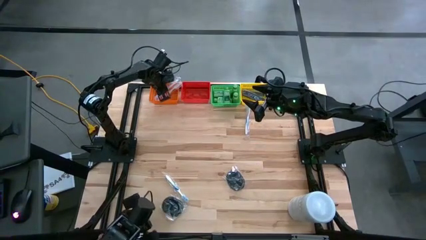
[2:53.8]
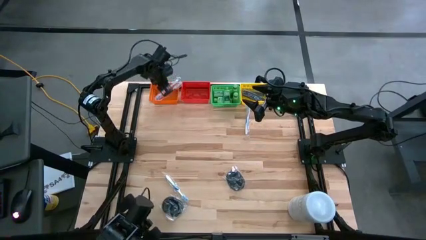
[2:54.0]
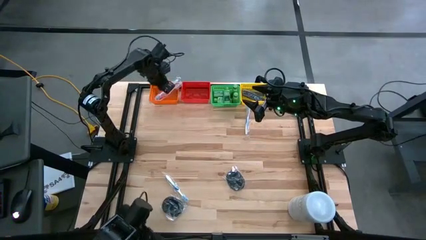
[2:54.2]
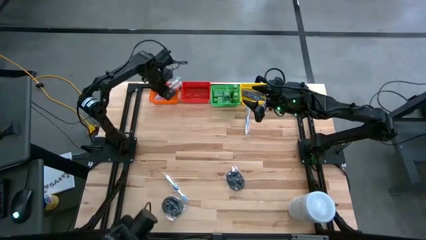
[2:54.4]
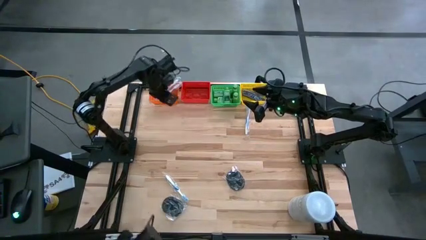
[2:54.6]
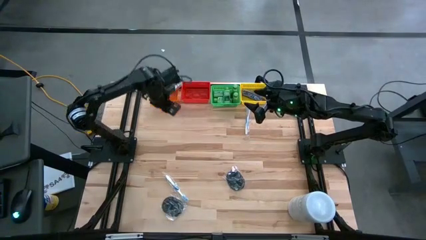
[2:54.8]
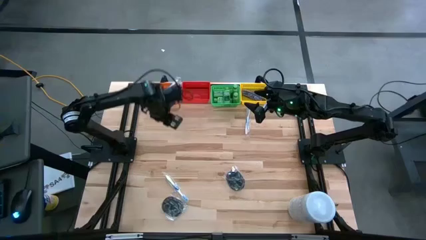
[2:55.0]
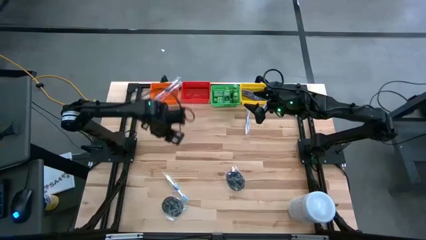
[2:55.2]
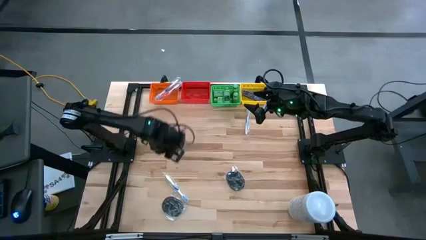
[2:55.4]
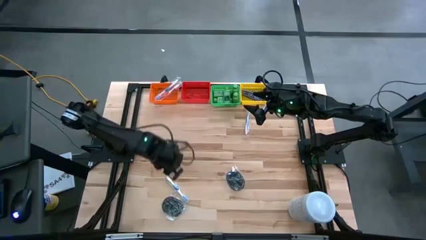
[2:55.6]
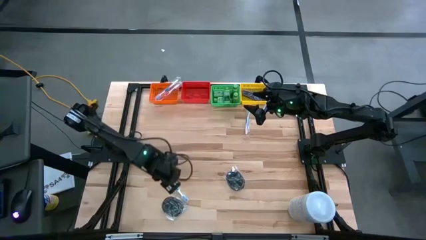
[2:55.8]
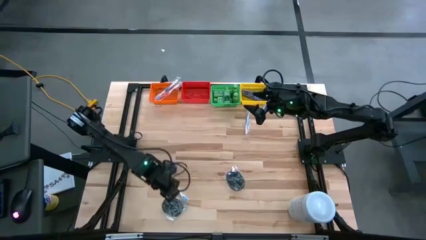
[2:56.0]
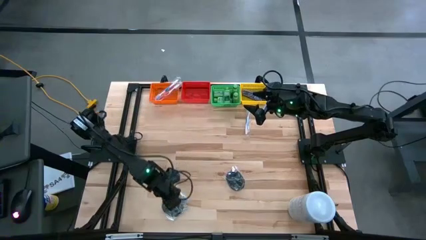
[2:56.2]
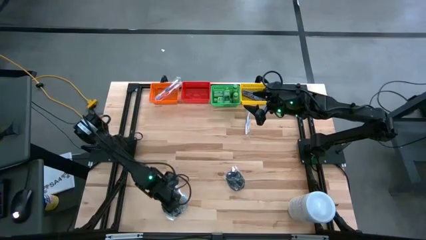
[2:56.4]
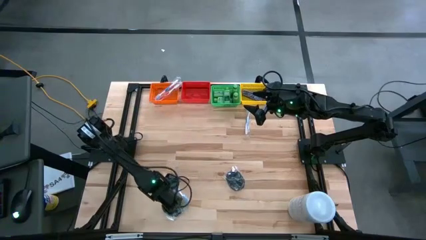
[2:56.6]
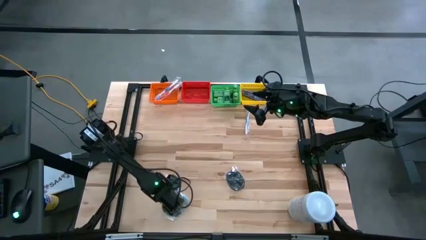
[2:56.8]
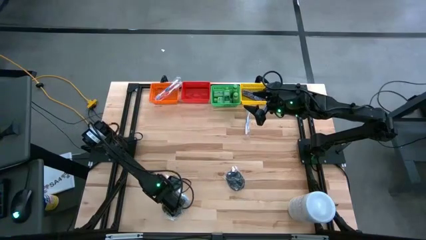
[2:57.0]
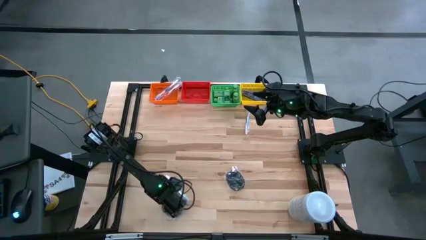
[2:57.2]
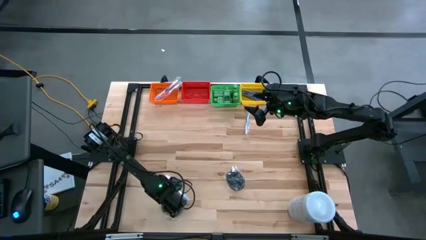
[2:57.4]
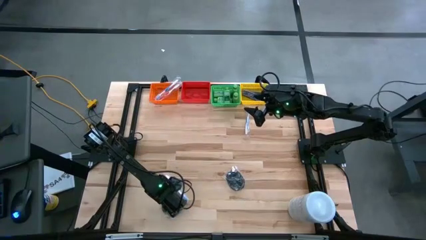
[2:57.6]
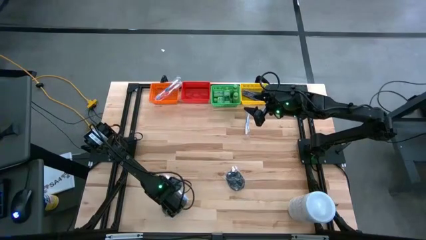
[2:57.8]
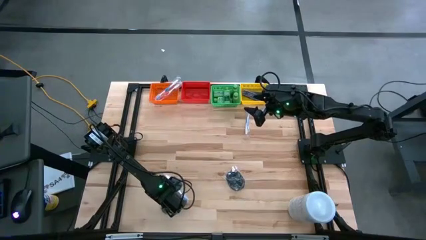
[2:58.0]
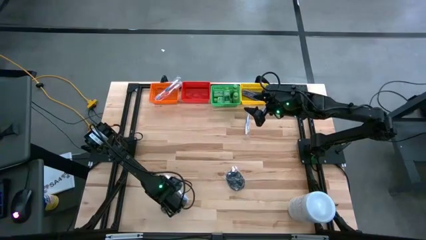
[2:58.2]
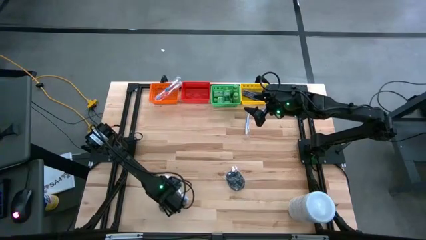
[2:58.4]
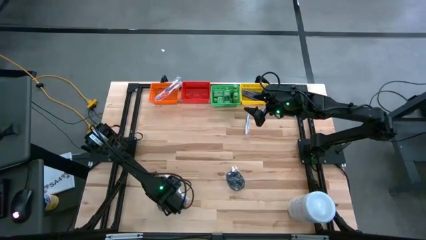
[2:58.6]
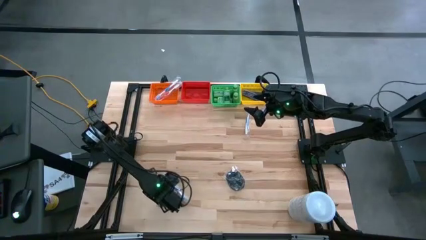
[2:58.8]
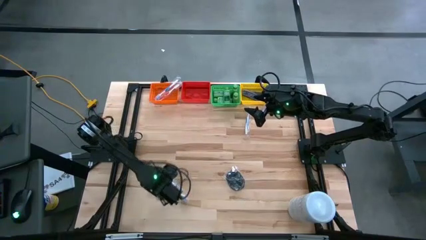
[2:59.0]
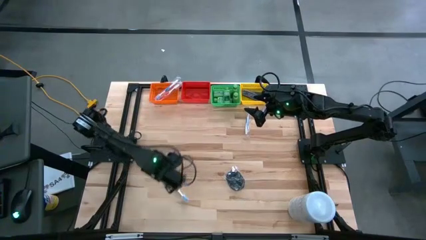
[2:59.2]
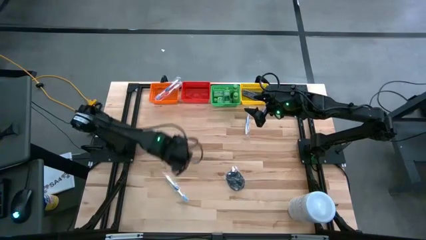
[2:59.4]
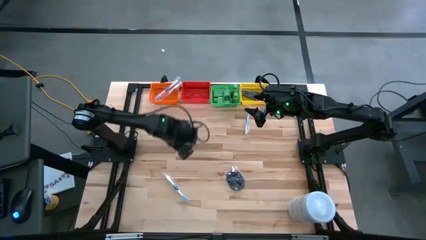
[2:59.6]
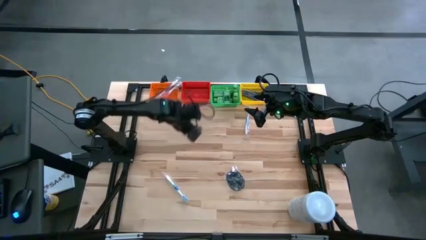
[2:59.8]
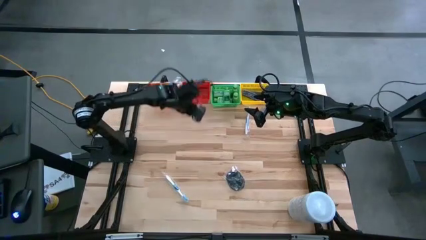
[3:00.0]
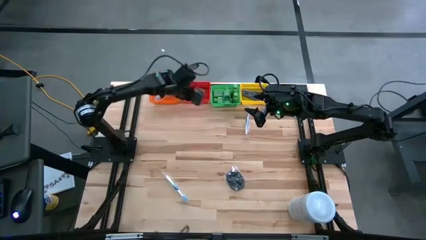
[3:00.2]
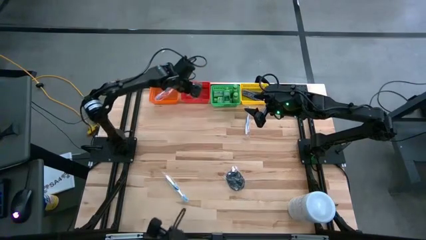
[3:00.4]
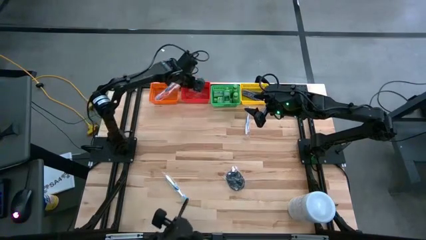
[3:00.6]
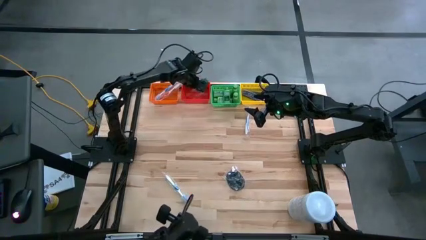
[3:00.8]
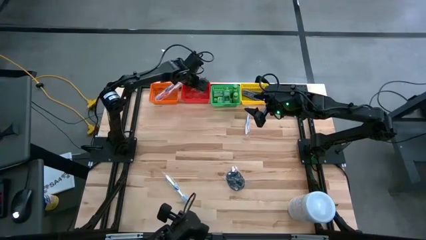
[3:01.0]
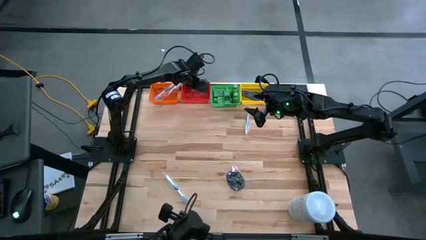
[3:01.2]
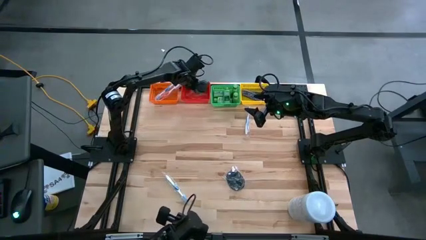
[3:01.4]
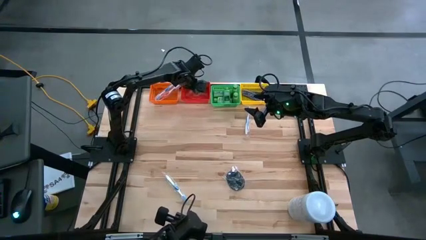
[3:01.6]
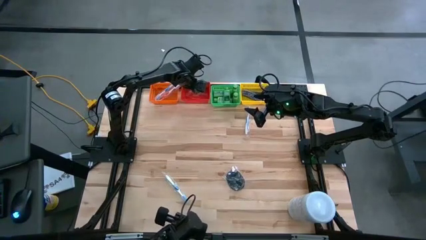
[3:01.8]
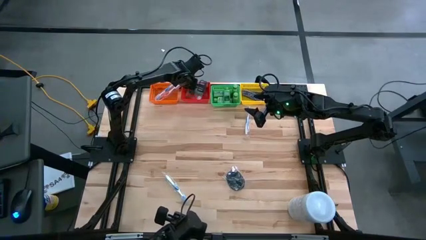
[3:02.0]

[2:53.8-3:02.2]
Task: Pick & Place Travel size toiletries
Put the black hairbrush into the red bin

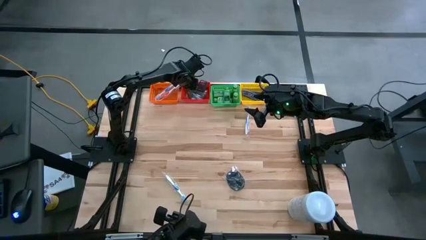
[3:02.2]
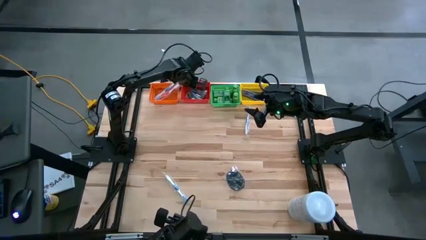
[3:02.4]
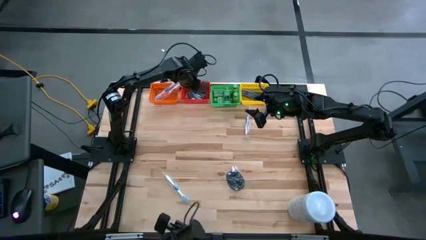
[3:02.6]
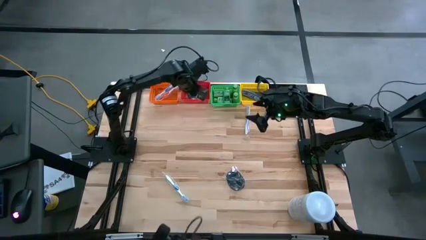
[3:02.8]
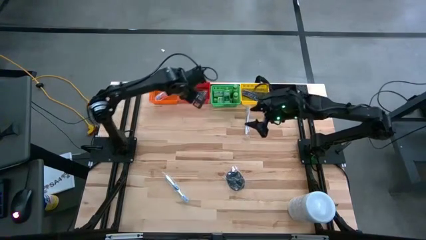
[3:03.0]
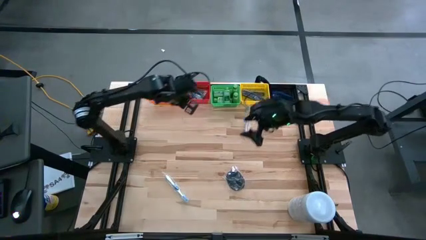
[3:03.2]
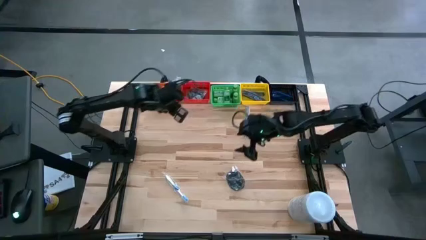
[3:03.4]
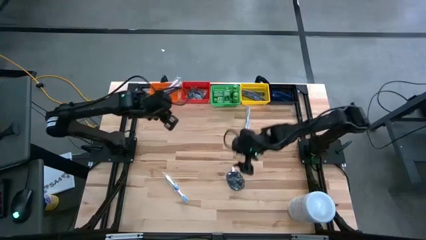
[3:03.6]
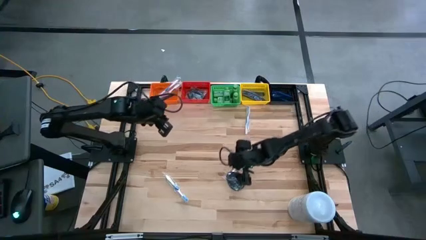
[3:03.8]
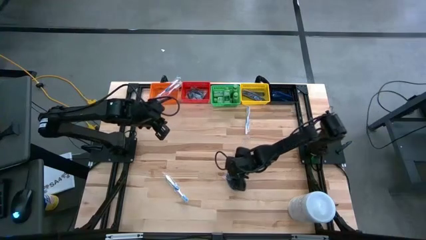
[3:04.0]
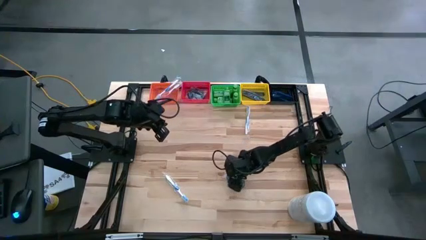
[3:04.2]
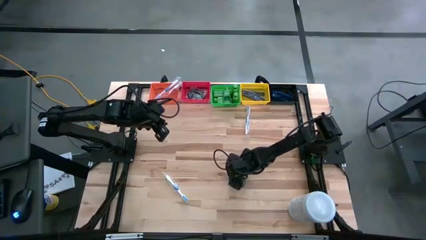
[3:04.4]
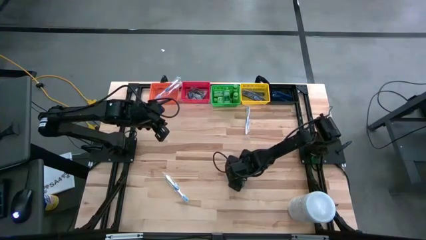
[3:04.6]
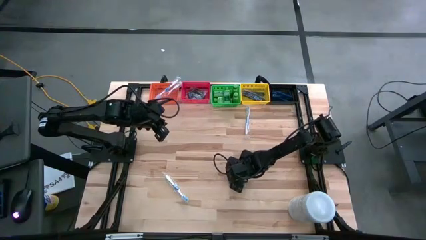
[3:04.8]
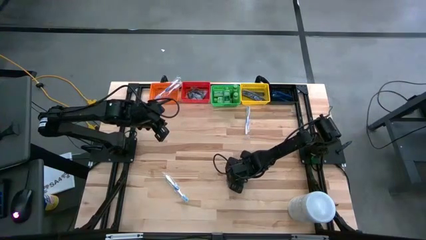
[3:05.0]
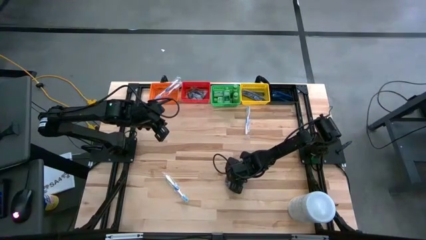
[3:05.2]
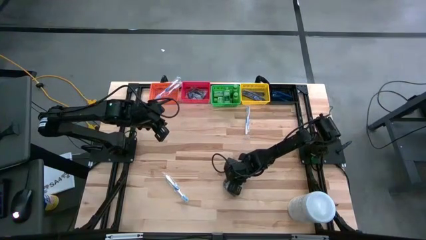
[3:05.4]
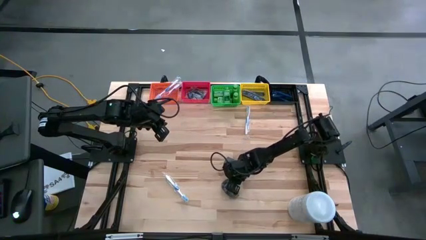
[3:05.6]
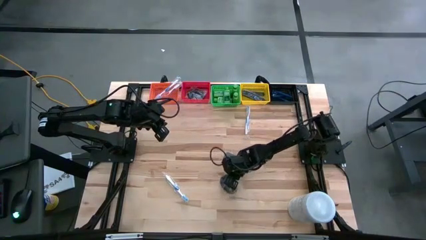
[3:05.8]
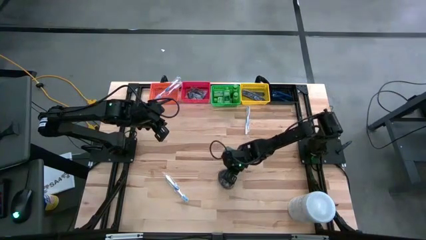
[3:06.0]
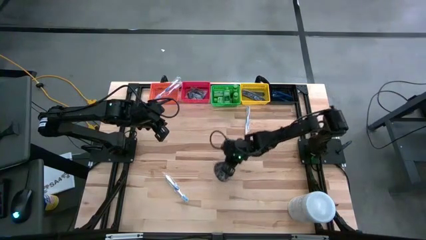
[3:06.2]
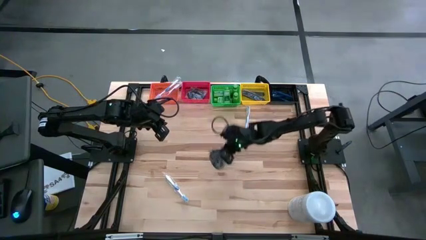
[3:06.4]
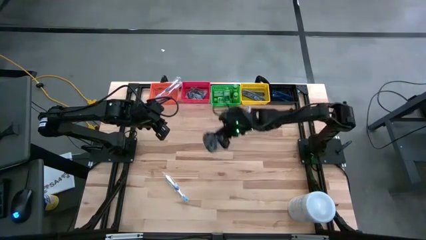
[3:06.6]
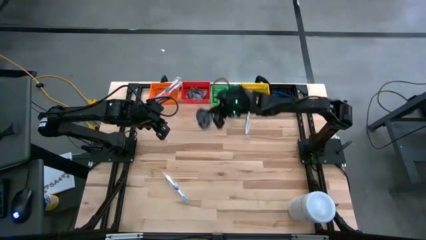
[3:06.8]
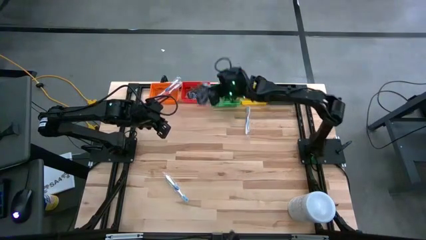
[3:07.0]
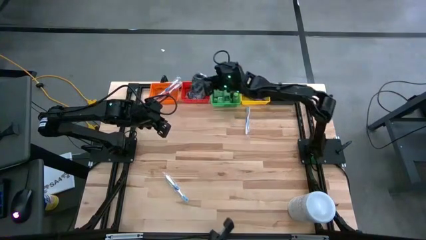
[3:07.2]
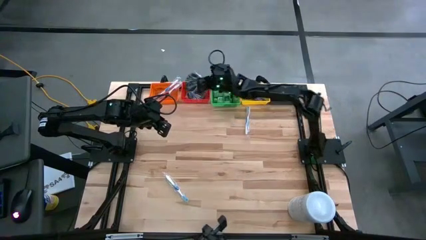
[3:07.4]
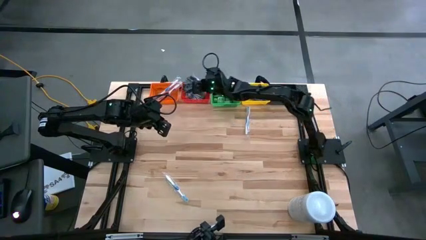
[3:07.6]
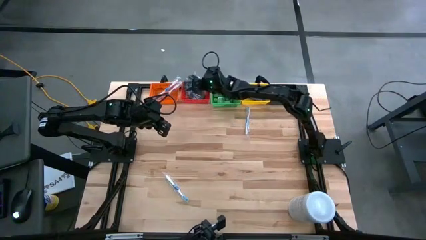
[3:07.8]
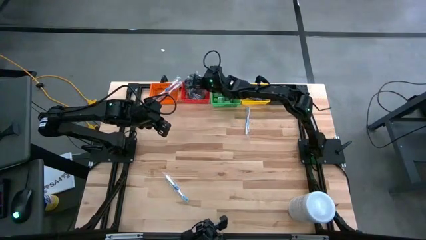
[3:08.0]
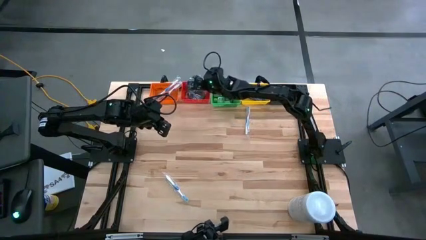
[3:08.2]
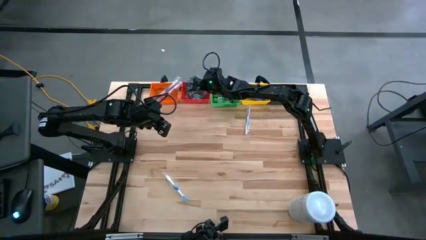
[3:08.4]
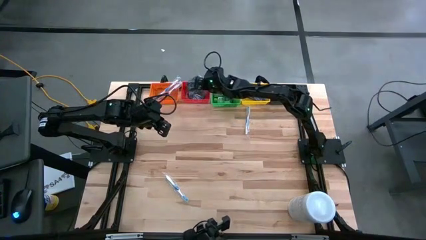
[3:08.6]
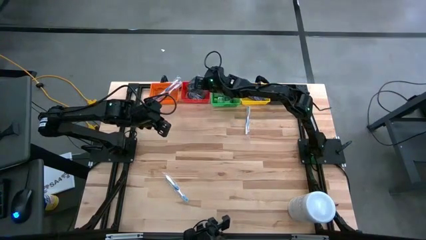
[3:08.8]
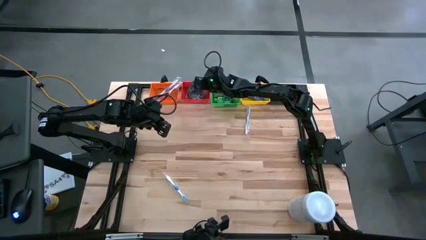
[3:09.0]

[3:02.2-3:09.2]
Put the black hairbrush into the red bin

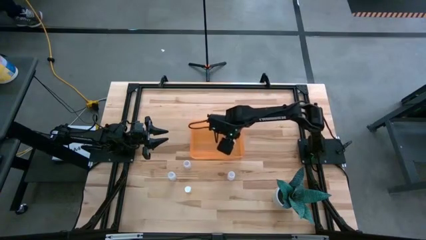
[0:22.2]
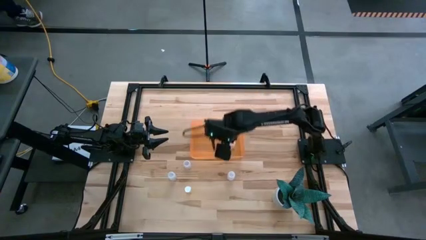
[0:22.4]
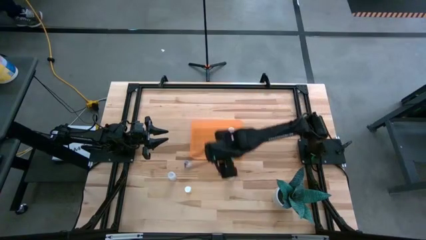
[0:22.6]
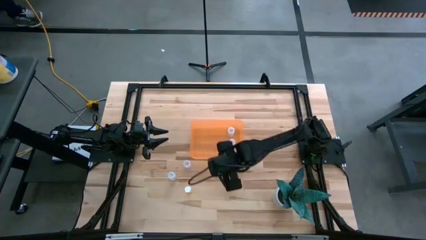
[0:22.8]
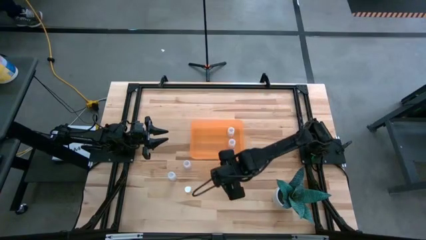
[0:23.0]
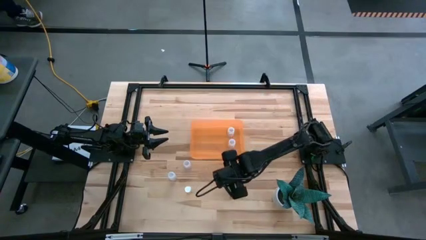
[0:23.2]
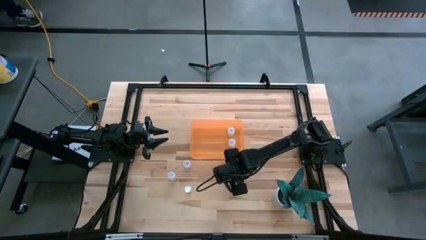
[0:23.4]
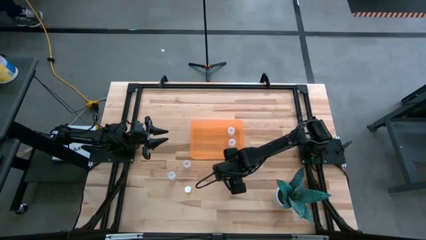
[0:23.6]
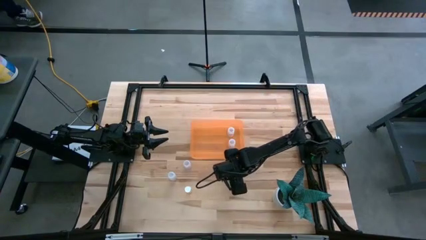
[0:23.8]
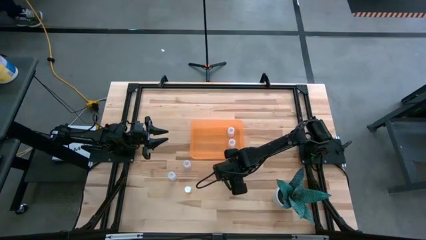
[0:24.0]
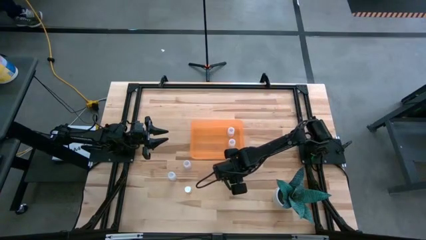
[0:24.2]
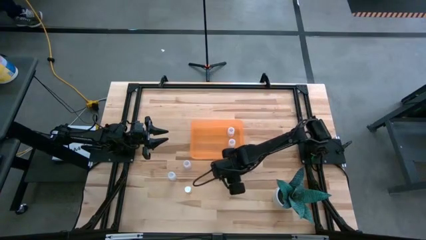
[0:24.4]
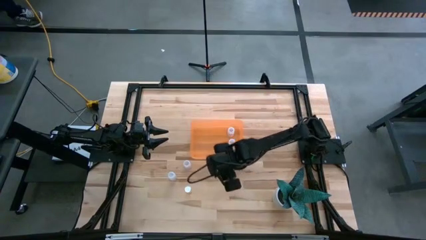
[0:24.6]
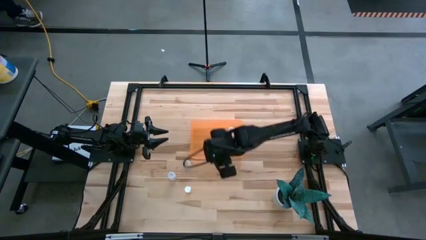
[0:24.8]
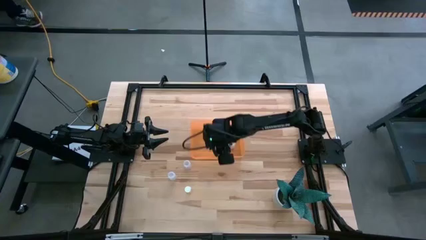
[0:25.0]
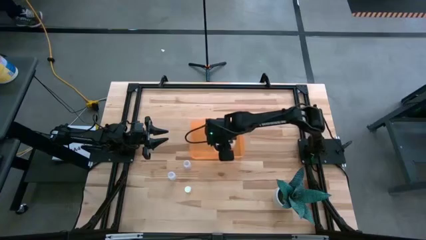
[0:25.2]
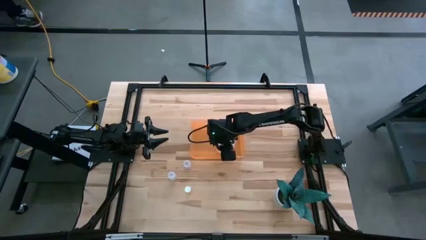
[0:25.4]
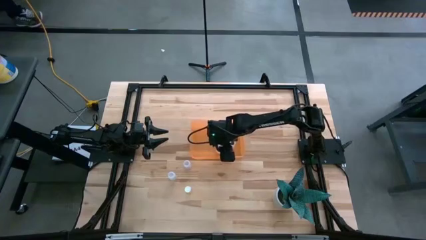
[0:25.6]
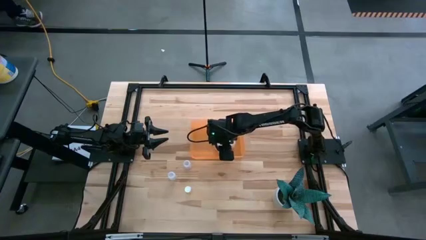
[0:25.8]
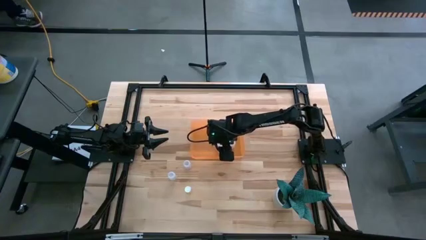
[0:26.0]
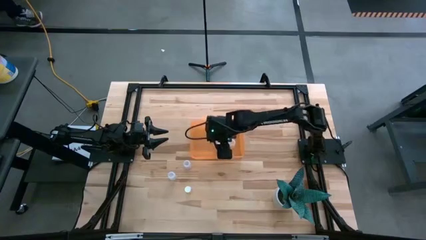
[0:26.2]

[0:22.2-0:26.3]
Task: Pick and place pill bottles into a basket
Put the transparent pill bottle in the orange bin
